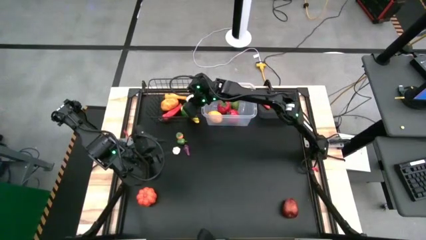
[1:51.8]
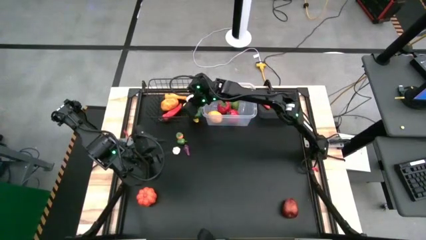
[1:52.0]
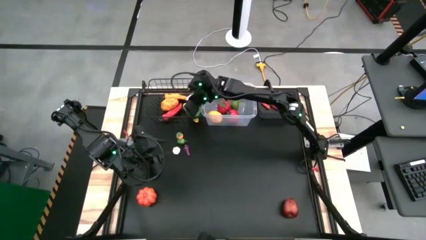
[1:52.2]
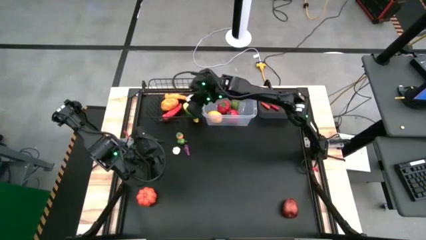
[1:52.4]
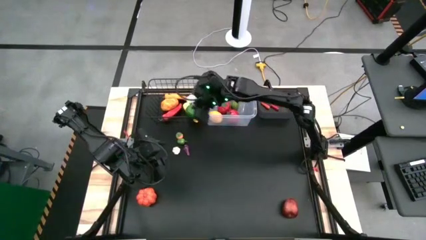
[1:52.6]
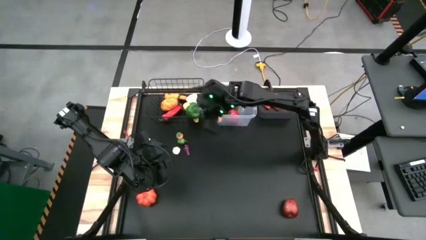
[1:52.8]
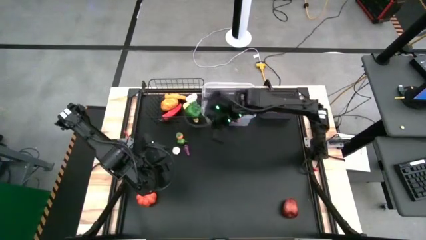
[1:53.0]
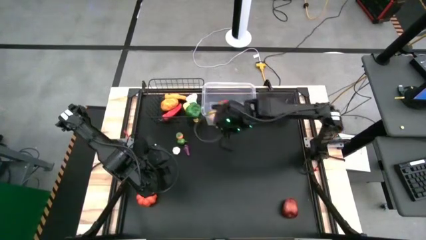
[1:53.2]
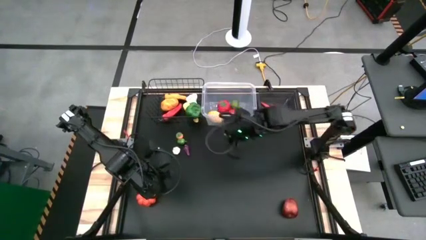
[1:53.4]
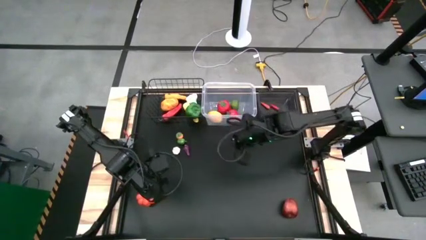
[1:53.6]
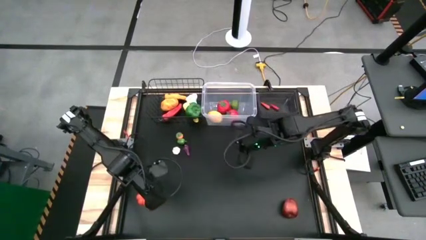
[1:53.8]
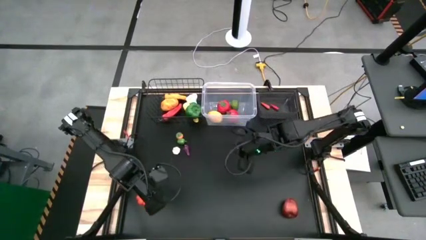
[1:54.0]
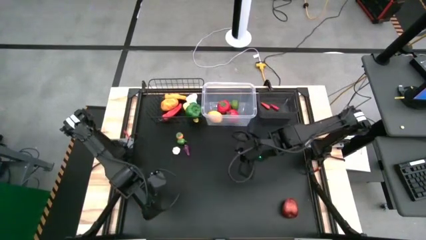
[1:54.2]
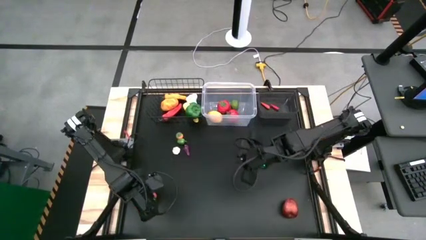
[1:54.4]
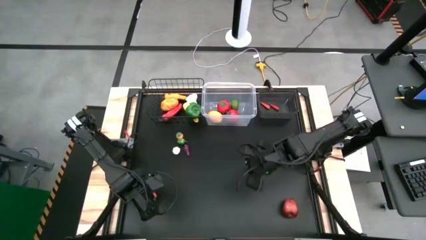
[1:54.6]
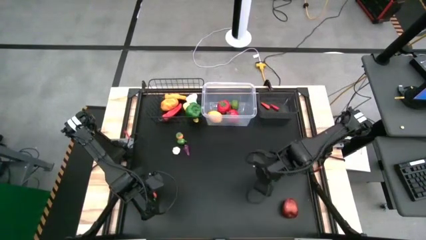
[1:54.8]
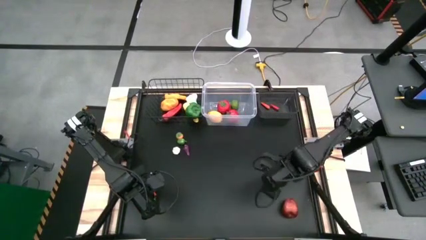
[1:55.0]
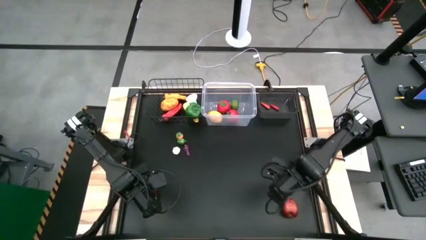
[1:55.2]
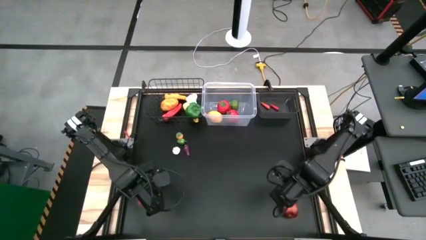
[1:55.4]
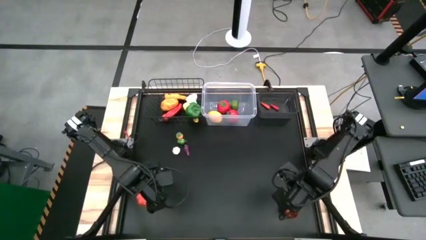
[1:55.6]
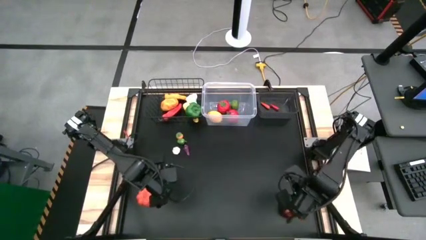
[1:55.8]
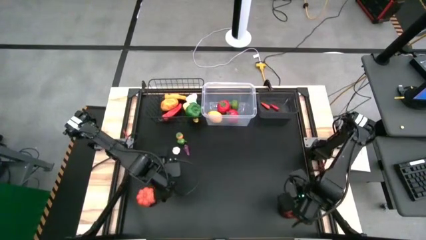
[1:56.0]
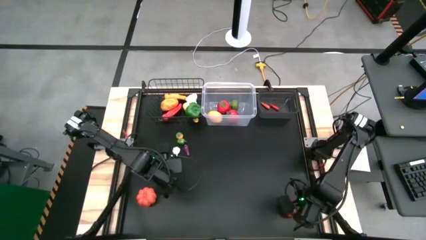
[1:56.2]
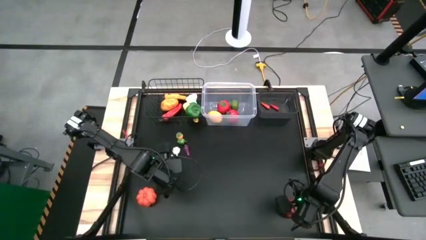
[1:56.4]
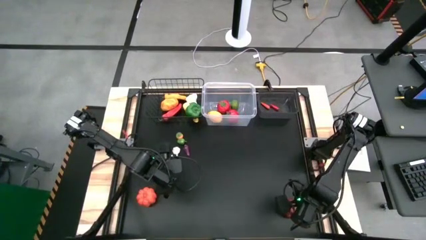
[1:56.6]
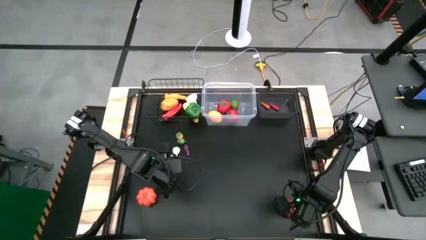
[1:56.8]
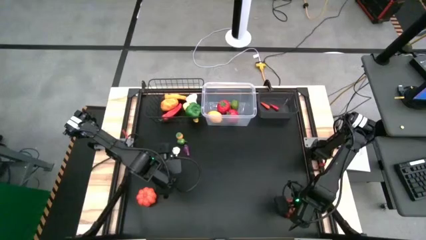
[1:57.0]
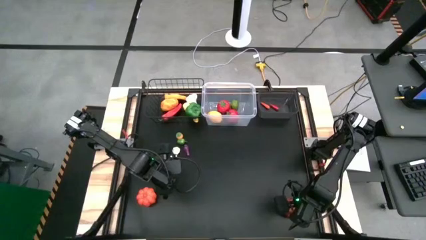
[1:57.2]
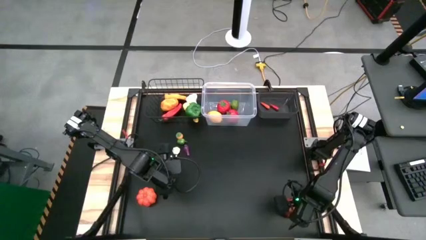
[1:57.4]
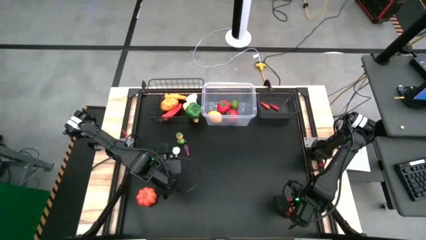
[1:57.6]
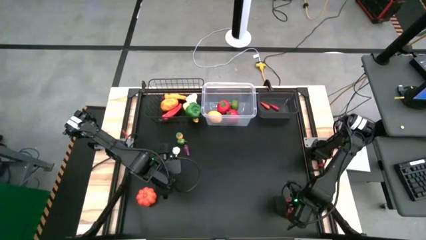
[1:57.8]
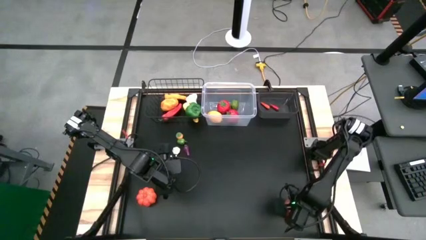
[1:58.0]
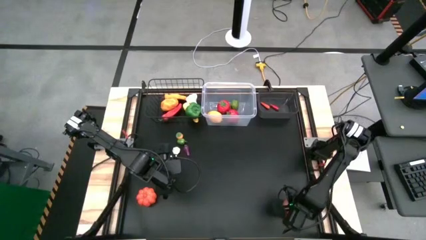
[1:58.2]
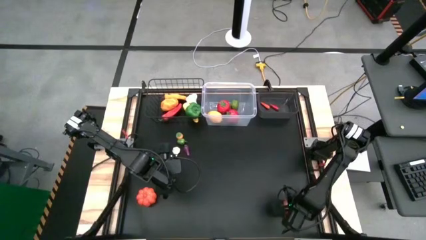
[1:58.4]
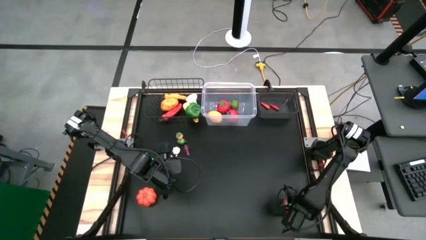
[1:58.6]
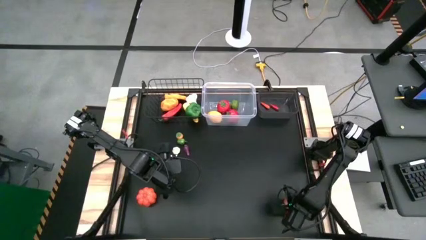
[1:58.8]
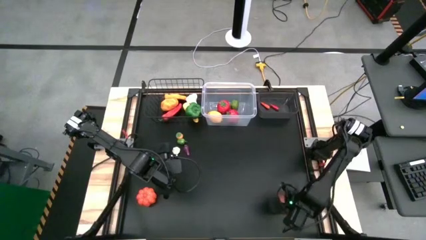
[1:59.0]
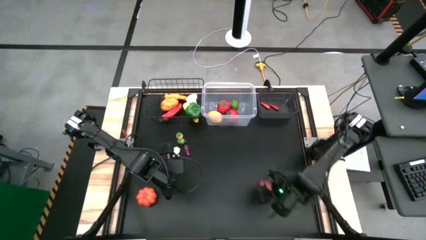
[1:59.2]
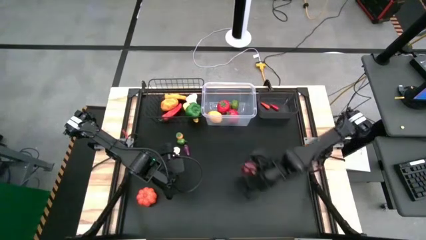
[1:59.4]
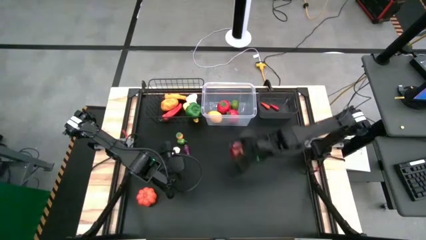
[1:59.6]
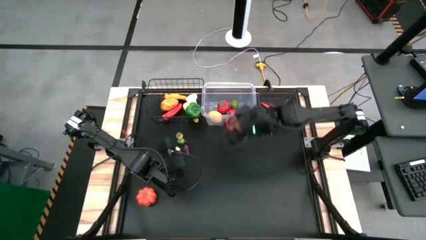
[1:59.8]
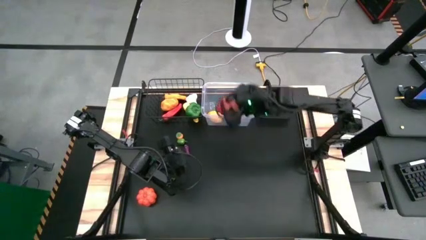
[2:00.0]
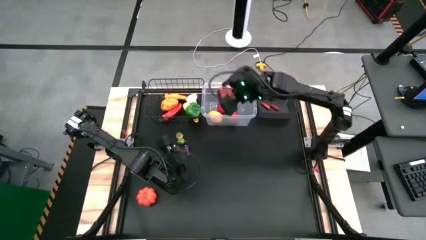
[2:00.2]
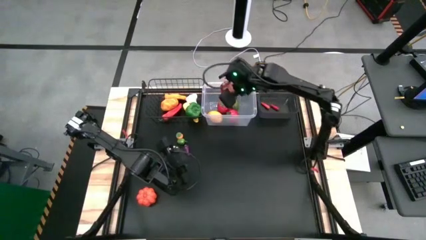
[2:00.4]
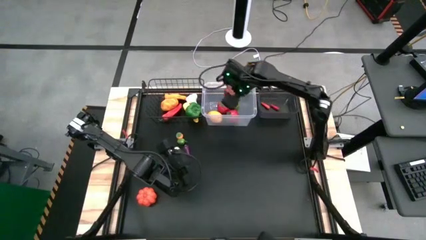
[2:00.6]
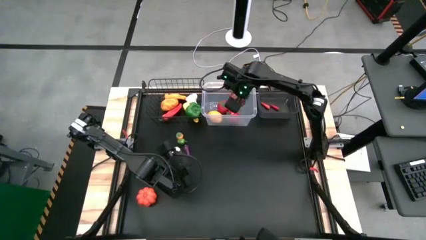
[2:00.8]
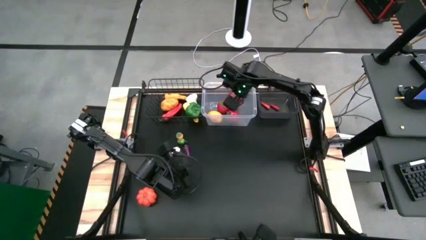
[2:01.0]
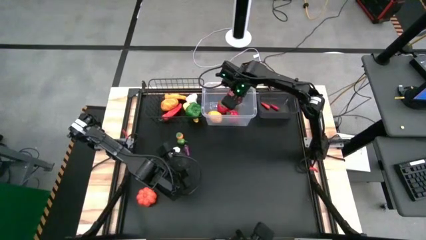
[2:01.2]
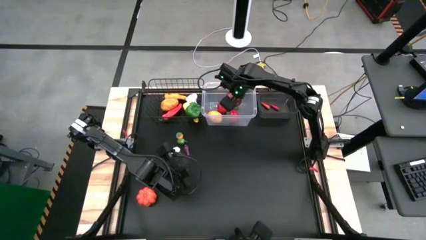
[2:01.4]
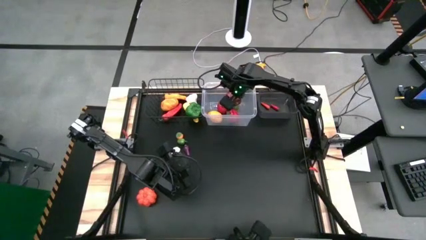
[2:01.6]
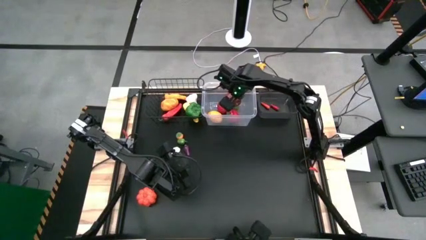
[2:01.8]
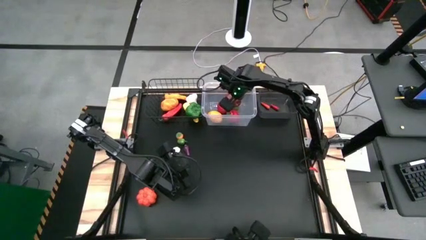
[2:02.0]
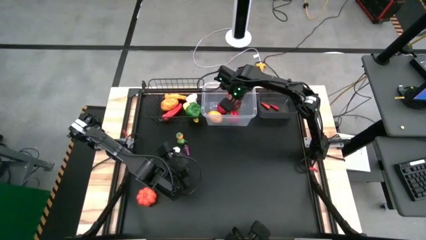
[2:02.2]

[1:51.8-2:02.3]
Task: Sort produce into baskets
Put the apple into the transparent bin

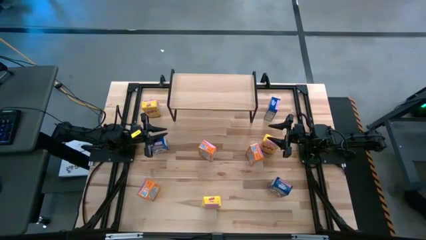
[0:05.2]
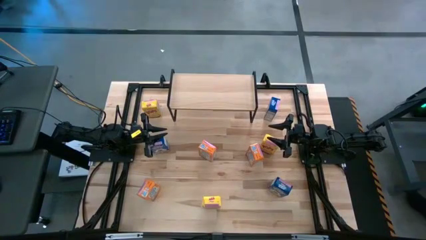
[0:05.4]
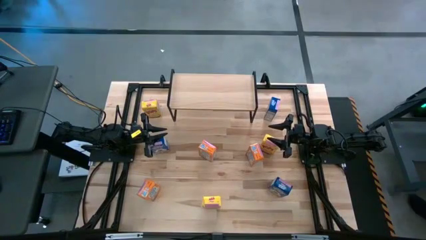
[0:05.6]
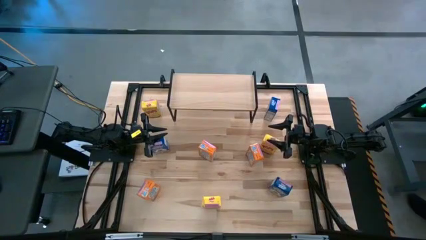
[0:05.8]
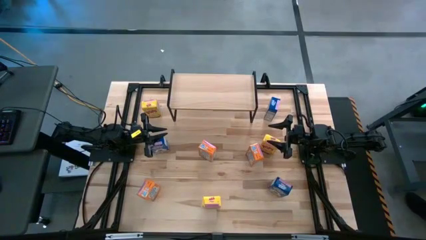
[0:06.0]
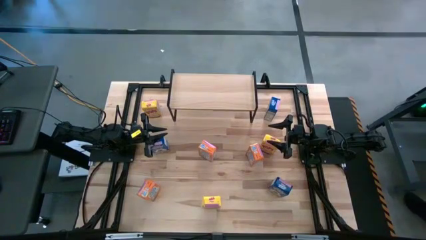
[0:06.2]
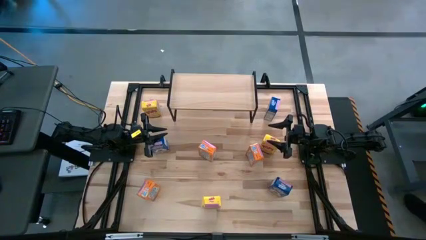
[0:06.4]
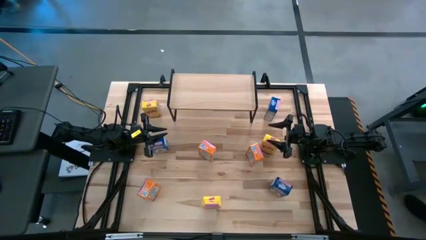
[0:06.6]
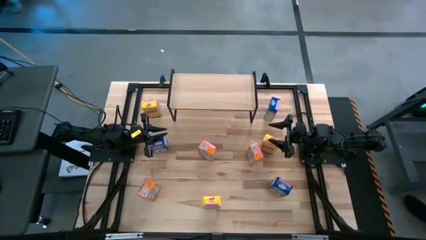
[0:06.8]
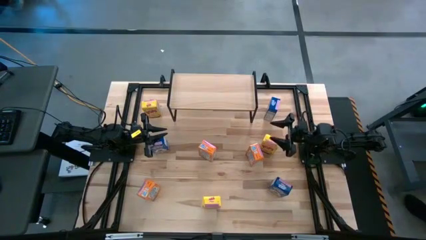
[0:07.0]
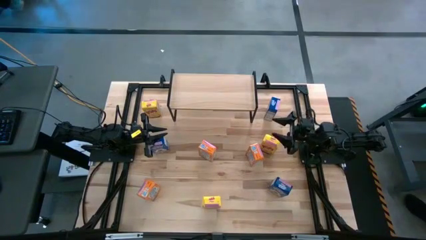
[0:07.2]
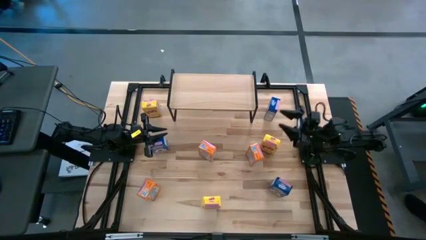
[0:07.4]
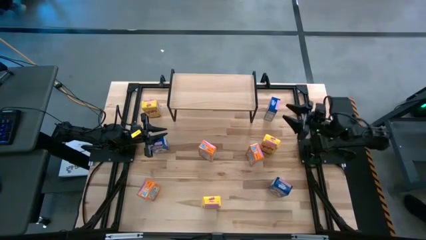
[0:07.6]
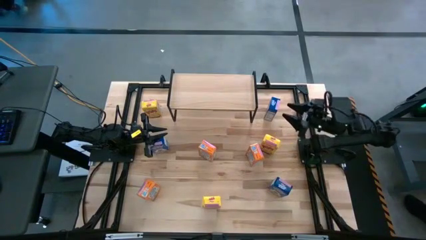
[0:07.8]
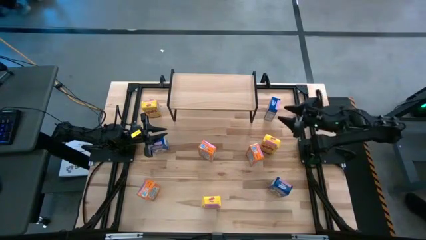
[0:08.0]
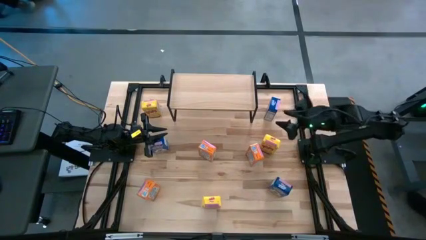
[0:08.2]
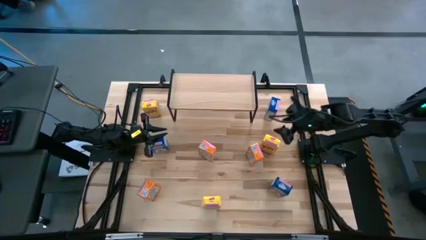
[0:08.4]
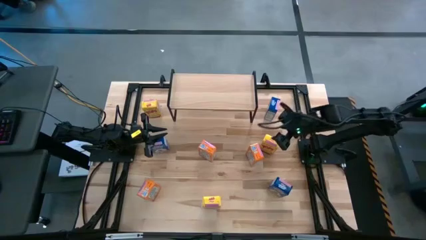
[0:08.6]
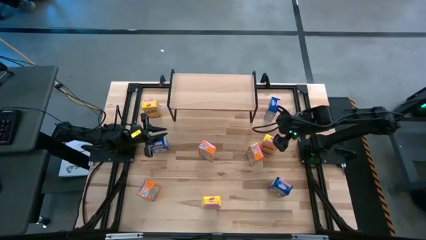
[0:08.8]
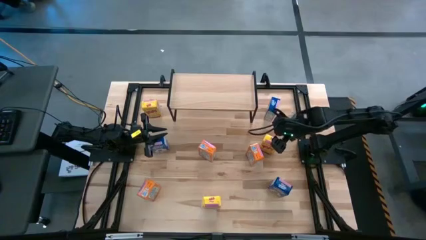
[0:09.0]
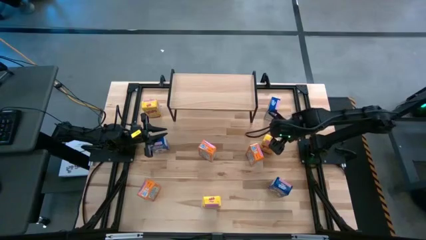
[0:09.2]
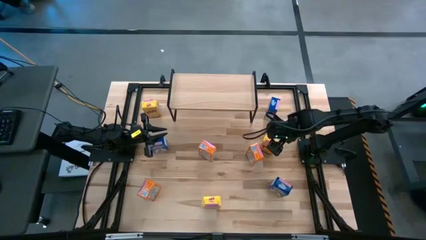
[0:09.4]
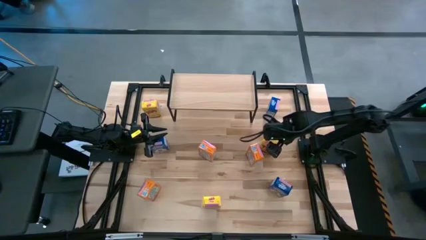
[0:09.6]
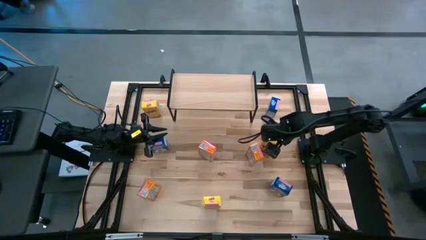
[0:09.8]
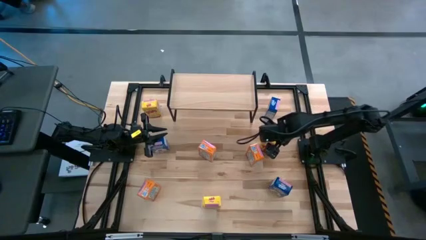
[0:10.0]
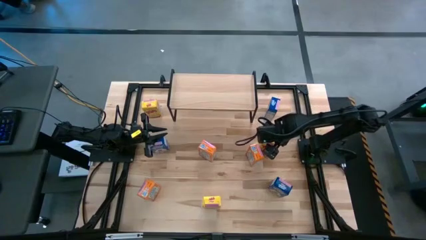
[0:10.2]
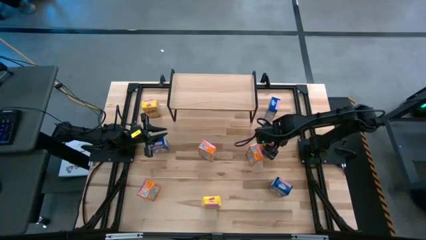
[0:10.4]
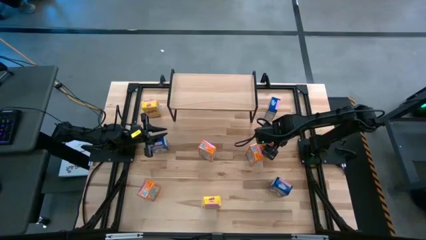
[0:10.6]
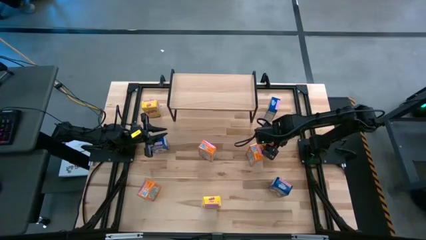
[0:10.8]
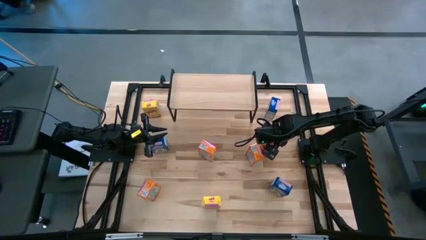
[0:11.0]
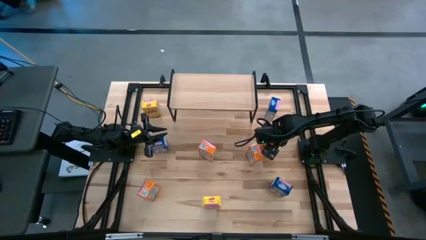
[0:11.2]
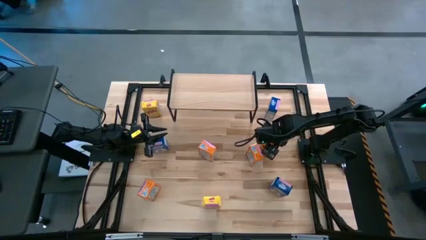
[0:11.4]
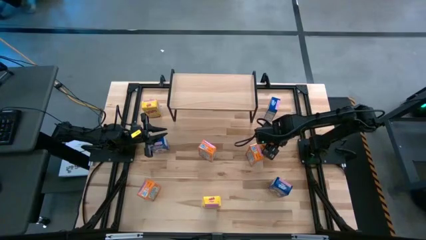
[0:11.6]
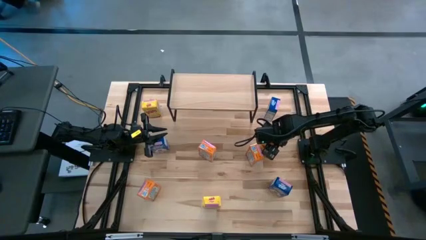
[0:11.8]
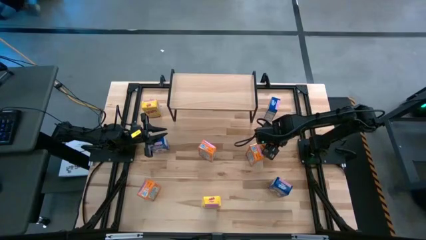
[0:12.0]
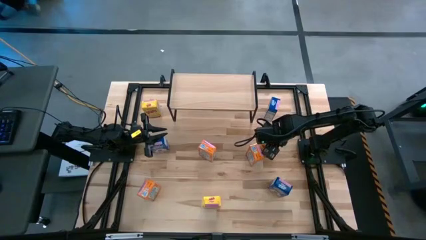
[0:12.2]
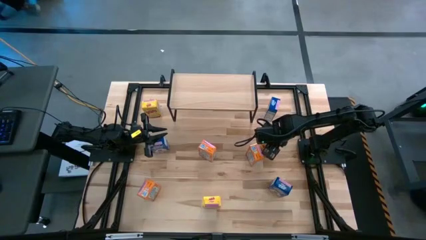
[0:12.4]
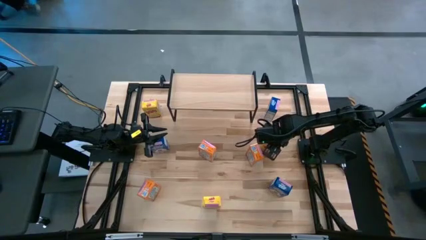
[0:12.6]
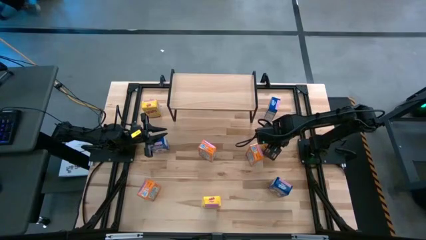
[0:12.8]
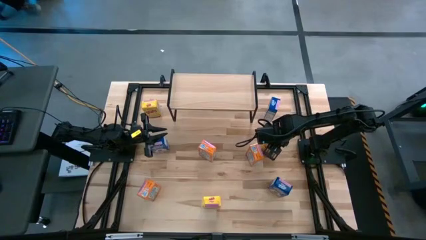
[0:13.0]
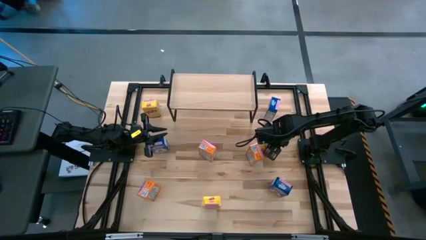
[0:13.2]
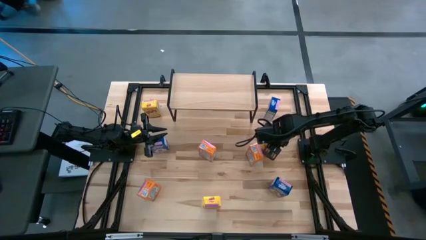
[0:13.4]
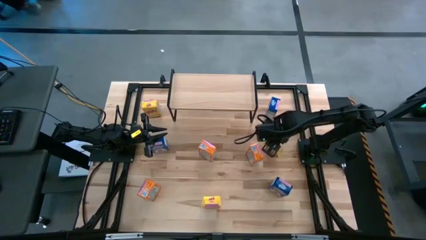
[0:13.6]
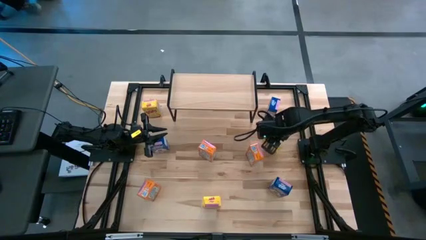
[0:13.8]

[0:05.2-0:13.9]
Task: Stack cereal on shelf
Put the middle right yellow cereal box on the shelf
